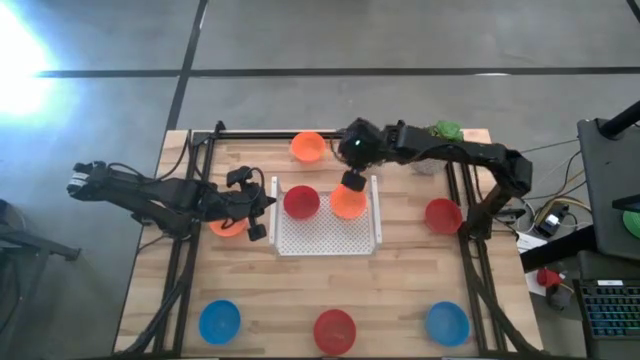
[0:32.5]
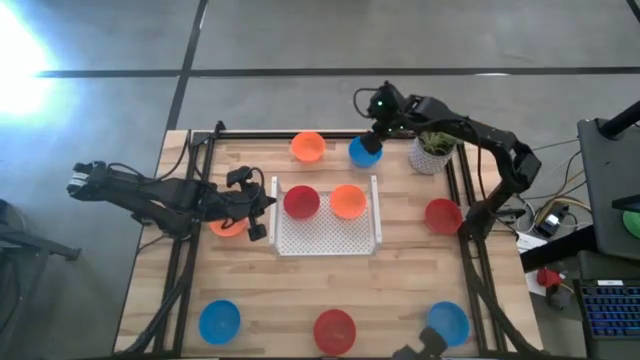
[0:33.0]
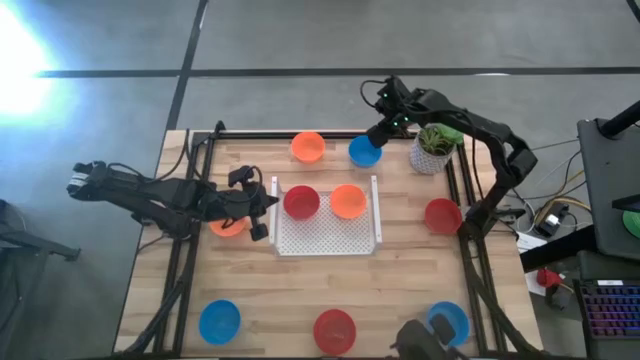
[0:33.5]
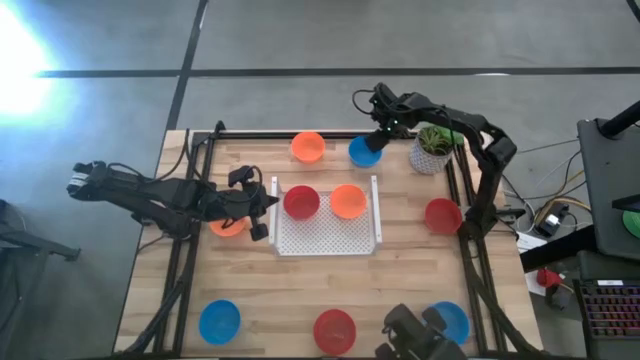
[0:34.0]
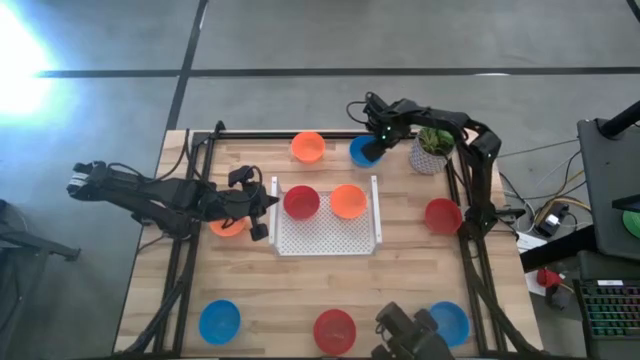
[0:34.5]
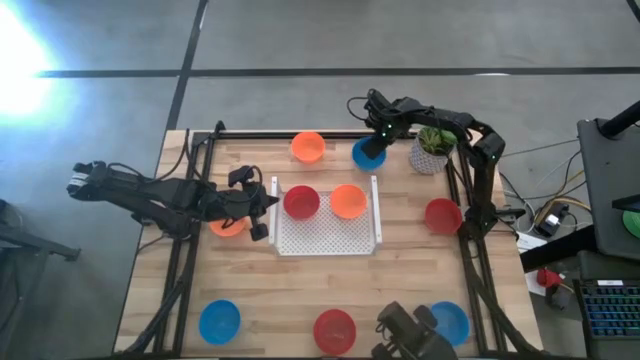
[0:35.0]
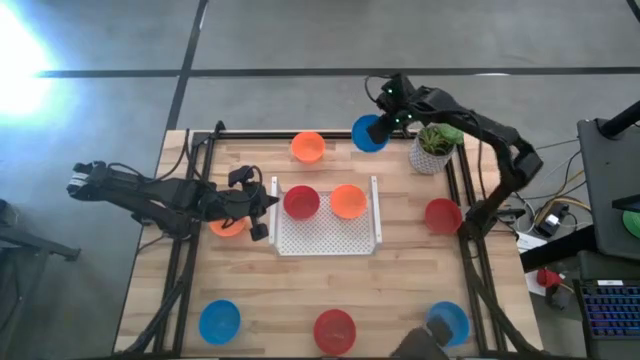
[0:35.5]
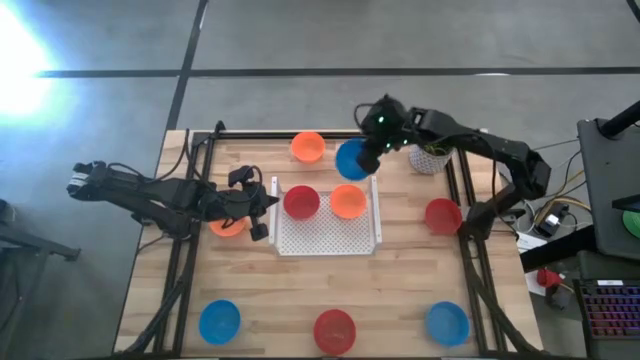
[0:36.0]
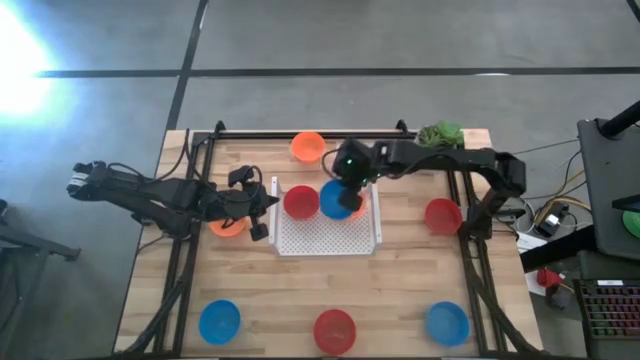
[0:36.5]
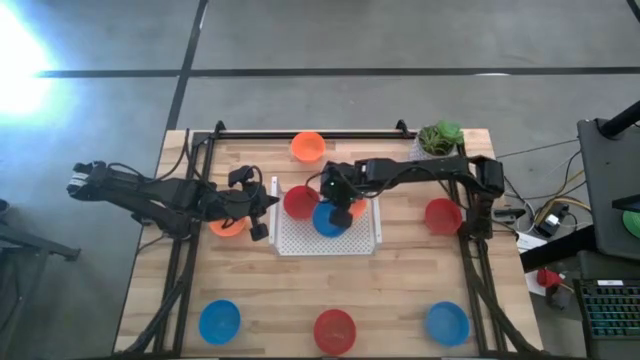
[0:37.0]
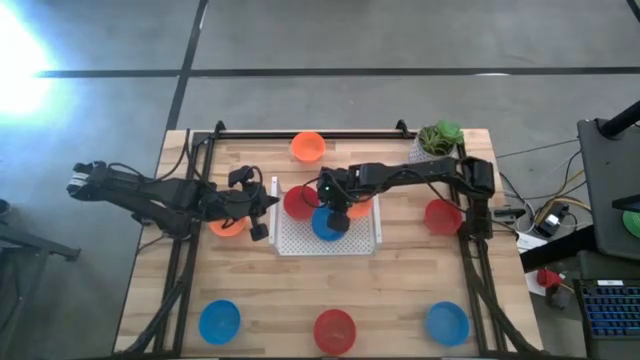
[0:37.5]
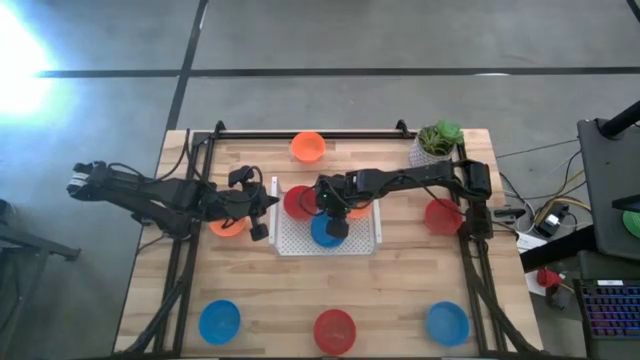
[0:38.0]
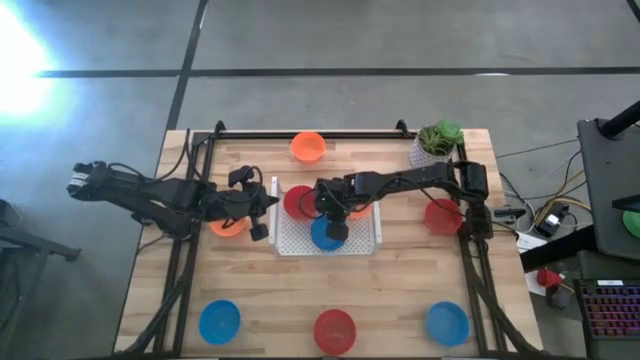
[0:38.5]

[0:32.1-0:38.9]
Task: Pick & Place Mini bowls
Put the top blue bowl on the shelf

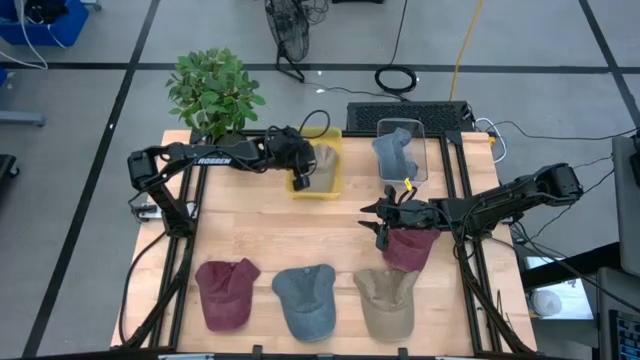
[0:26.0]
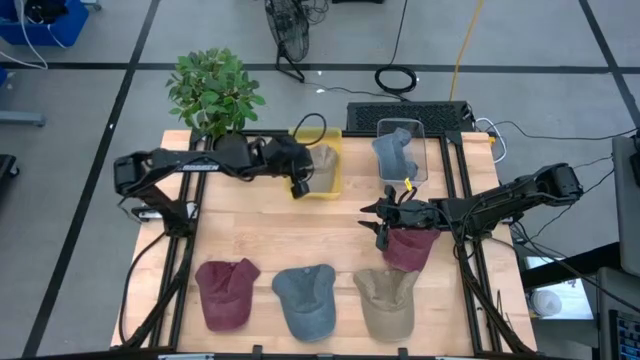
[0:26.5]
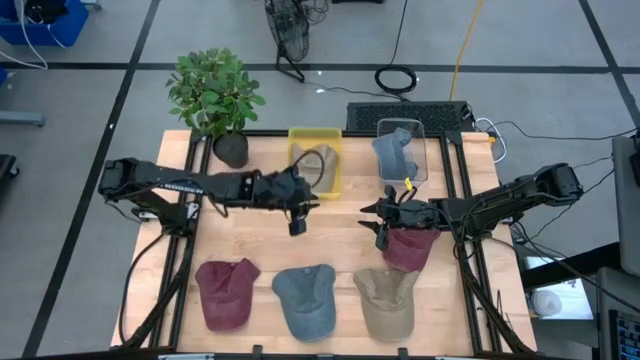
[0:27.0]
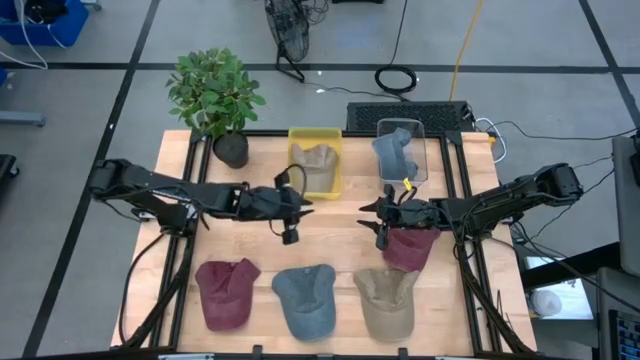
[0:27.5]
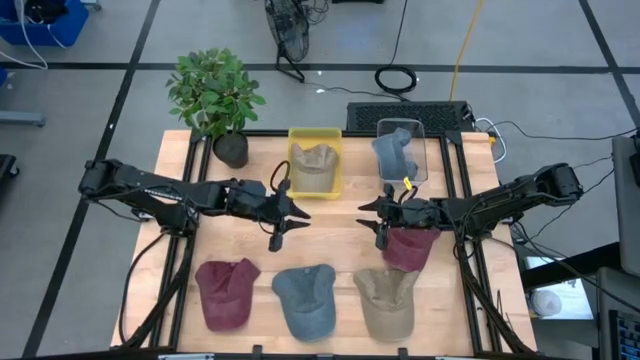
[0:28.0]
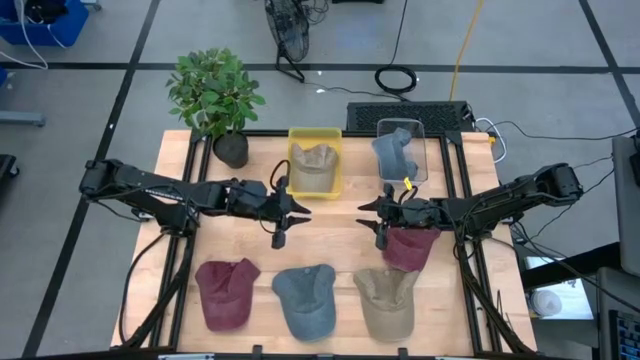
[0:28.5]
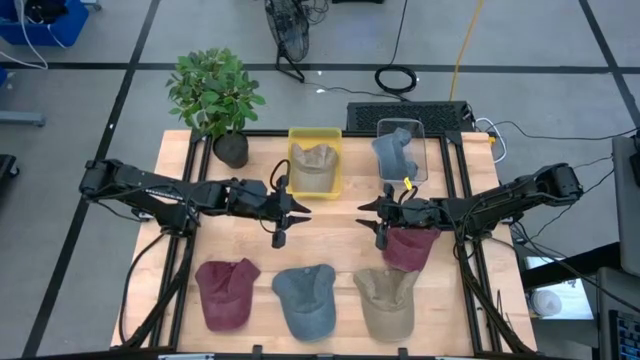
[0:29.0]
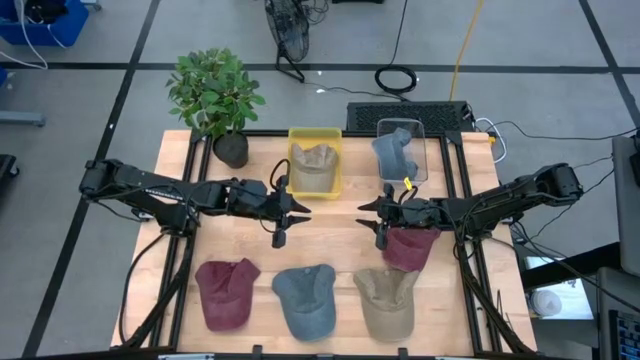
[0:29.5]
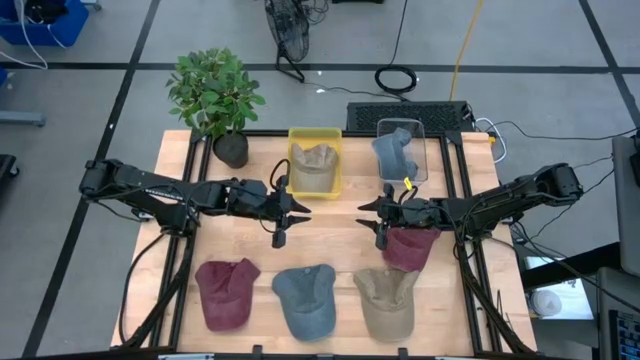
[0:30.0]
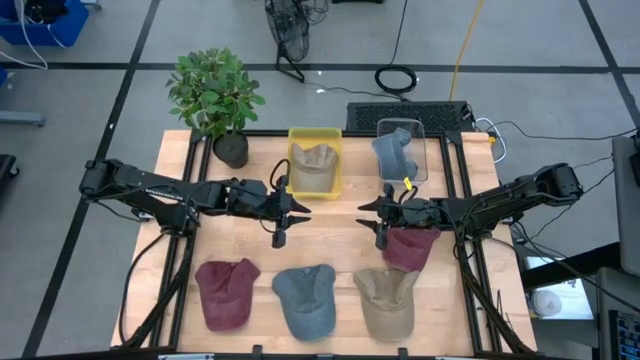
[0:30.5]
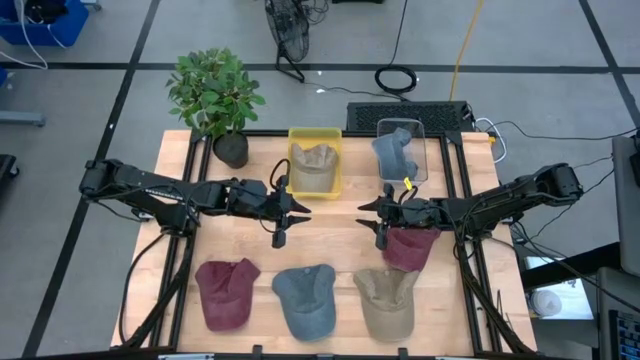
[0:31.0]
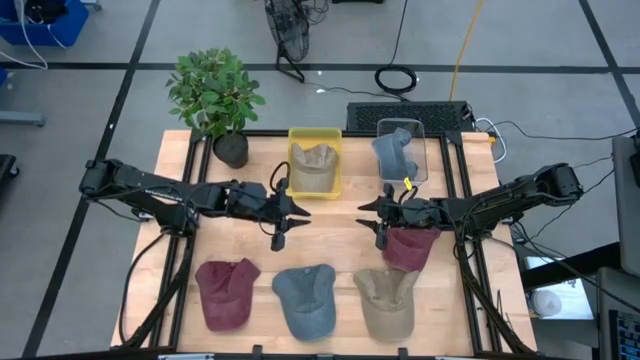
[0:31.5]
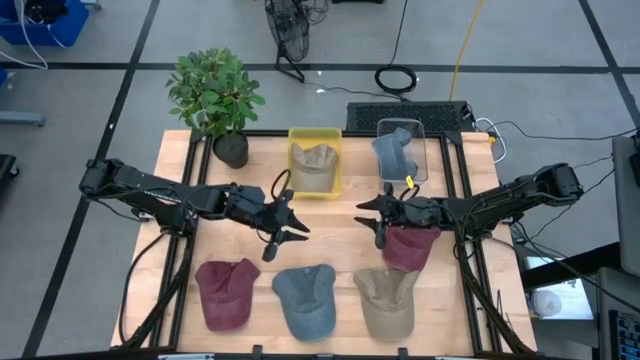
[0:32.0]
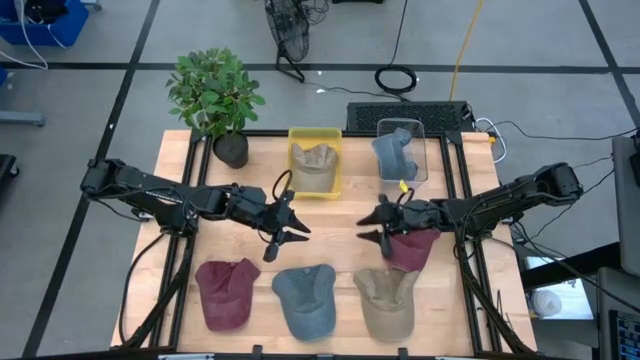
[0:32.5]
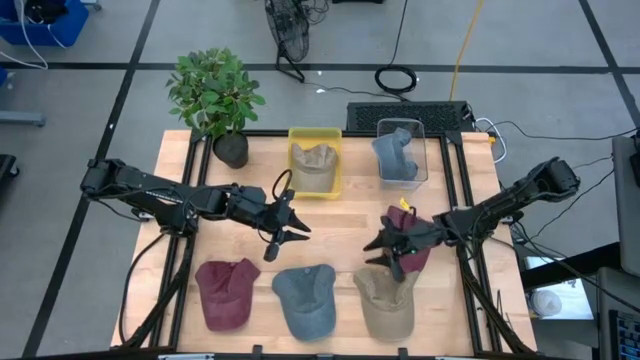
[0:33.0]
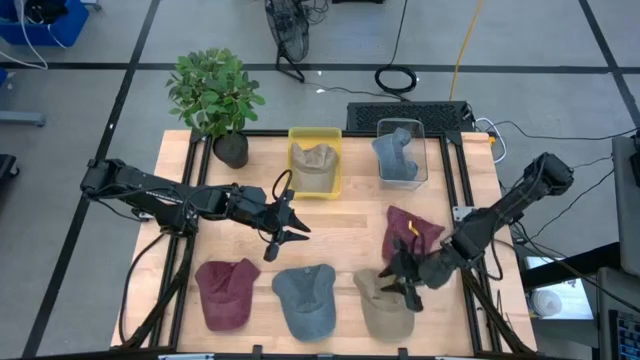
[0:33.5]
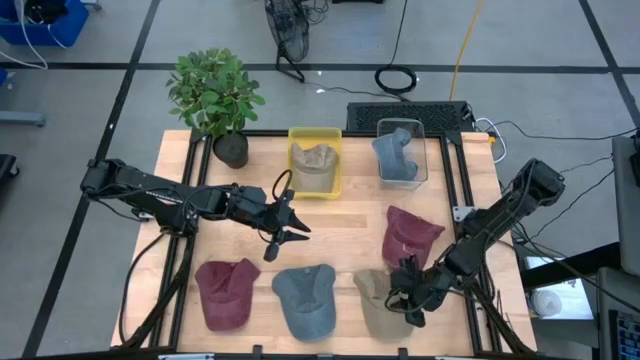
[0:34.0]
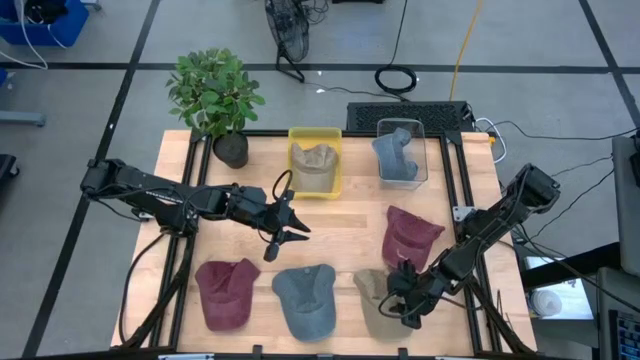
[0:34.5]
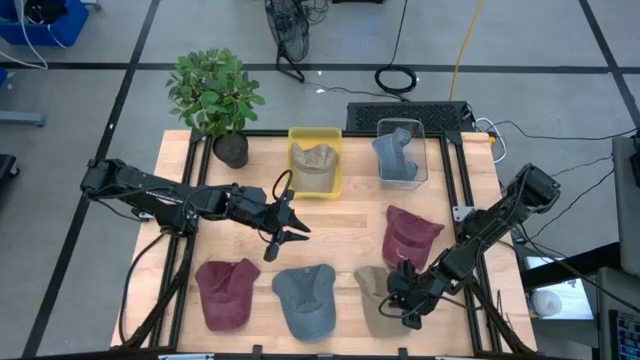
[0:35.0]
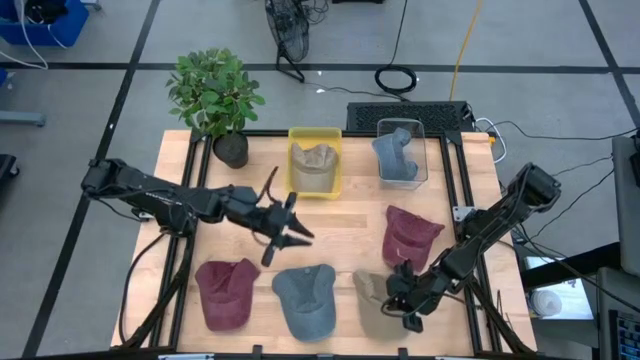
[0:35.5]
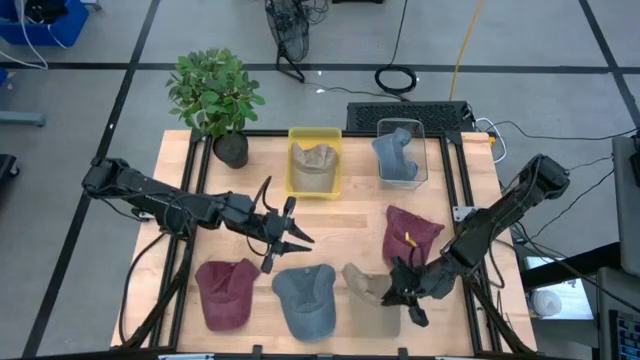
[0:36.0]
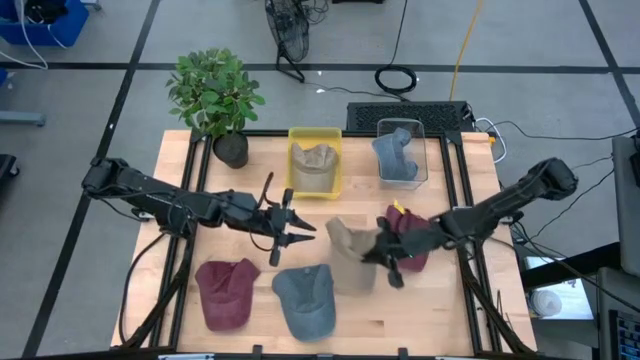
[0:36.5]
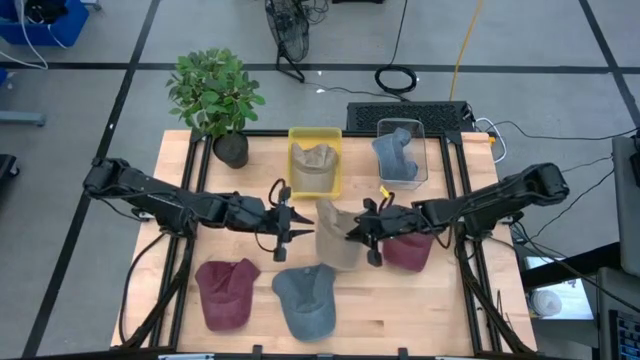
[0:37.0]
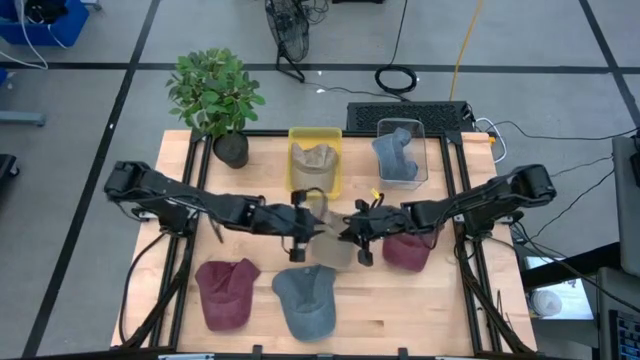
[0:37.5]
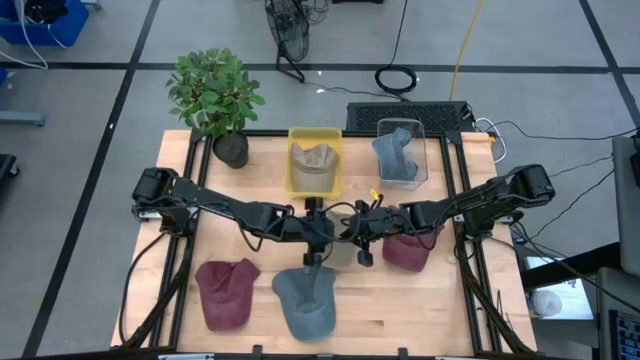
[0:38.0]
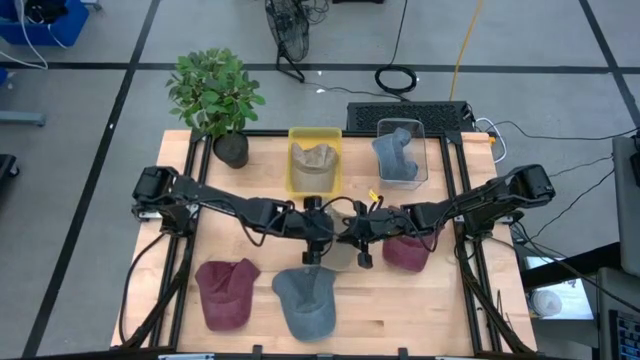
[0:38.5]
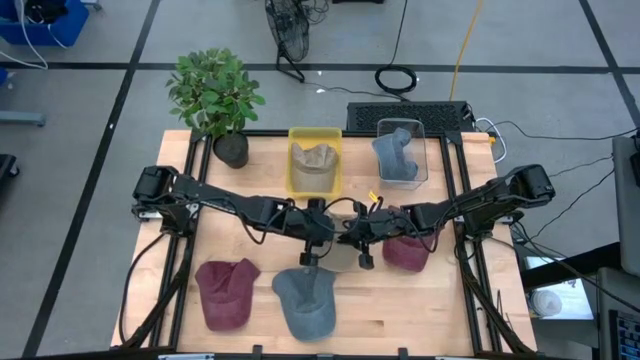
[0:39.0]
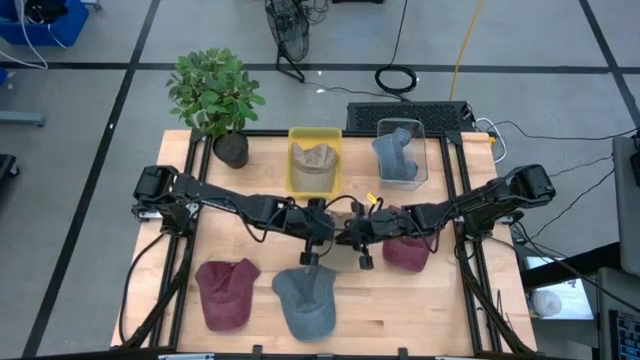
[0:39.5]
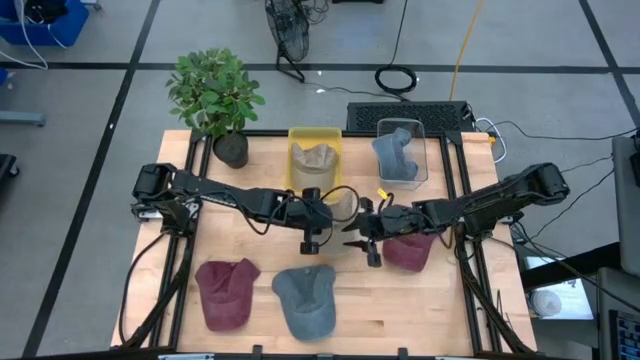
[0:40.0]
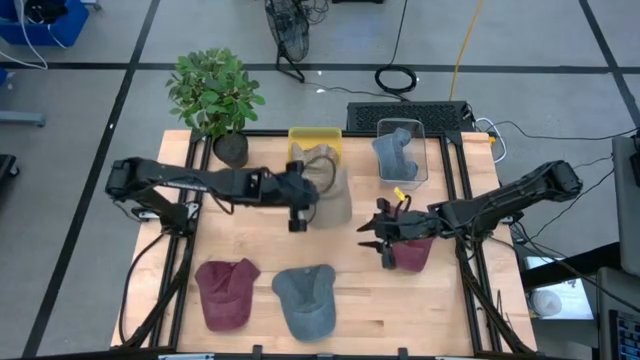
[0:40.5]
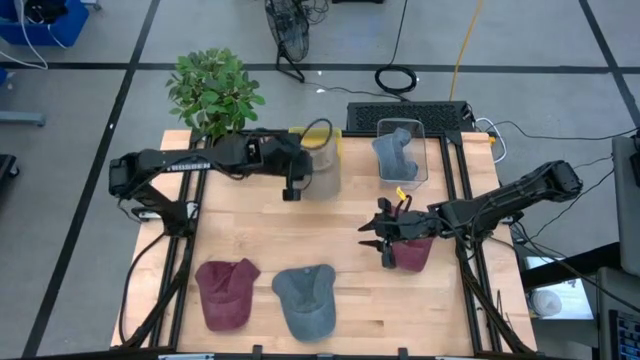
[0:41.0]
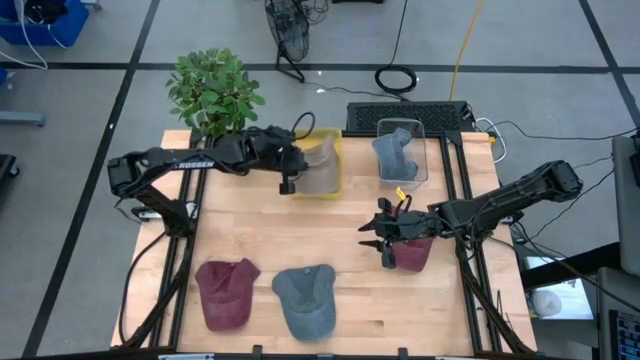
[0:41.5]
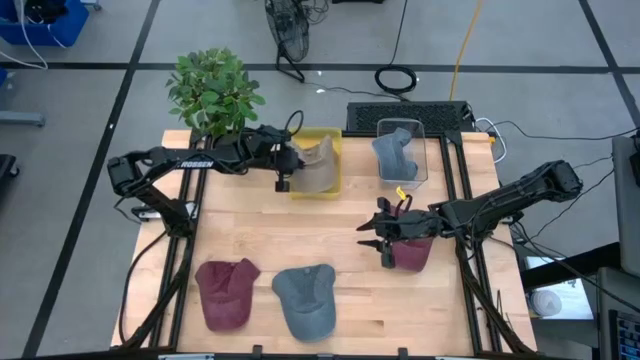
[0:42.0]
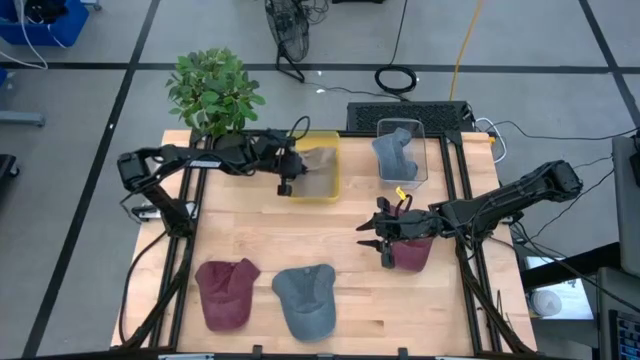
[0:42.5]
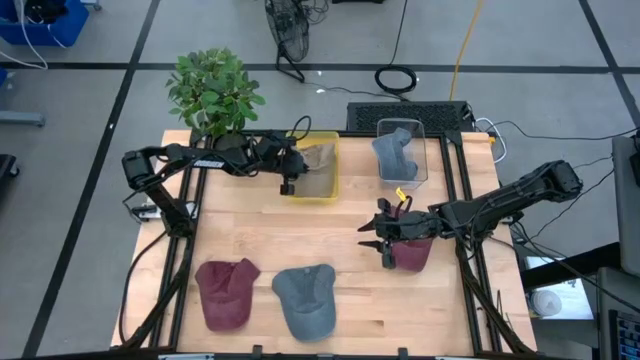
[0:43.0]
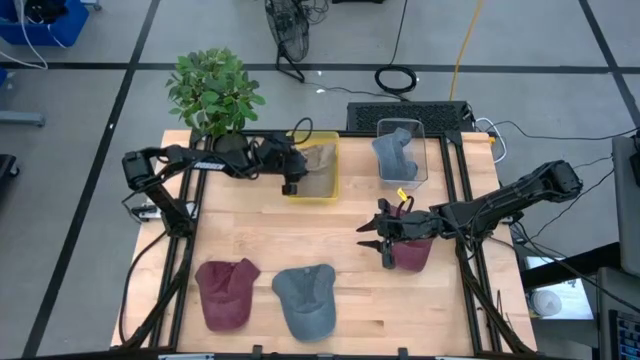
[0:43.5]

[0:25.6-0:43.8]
Task: Pick & Place hat
Put the light brown cap into the yellow bin
